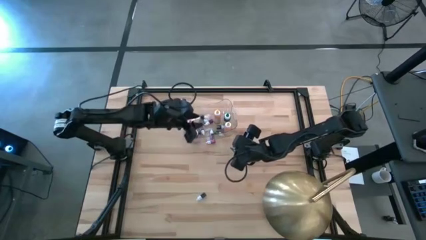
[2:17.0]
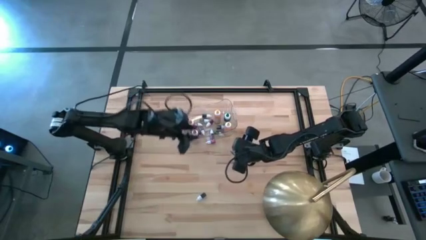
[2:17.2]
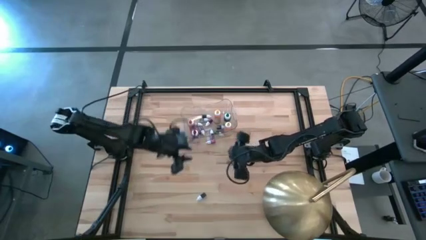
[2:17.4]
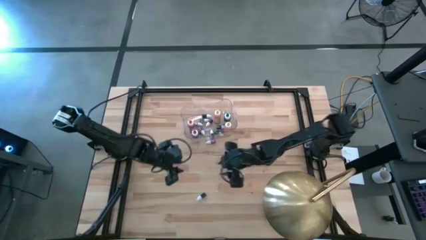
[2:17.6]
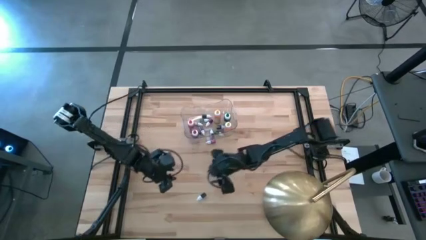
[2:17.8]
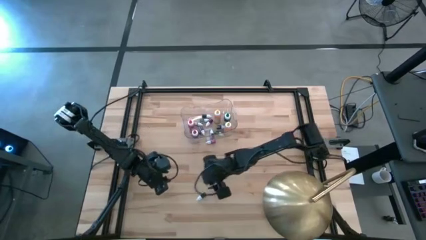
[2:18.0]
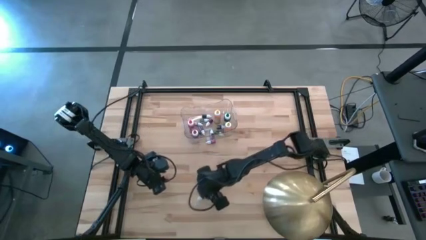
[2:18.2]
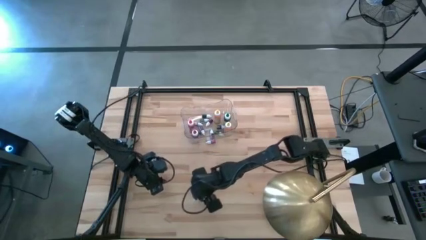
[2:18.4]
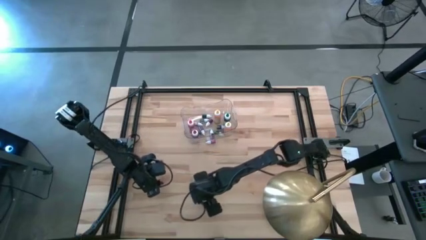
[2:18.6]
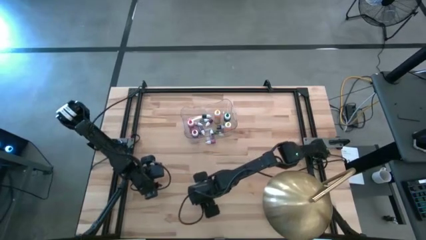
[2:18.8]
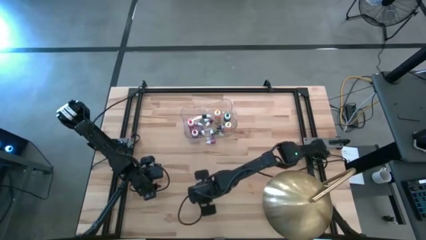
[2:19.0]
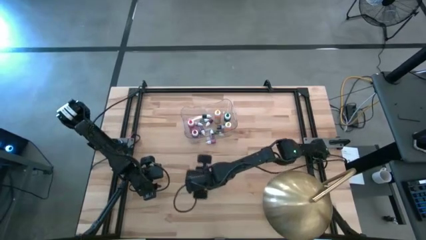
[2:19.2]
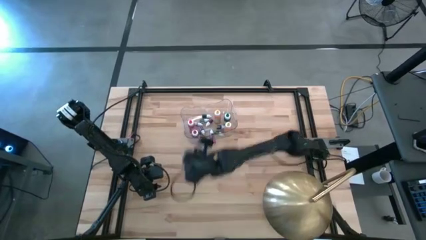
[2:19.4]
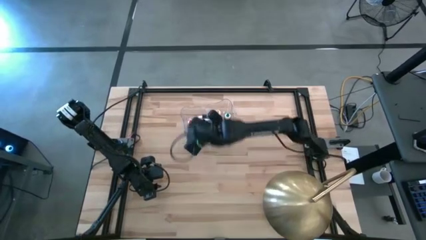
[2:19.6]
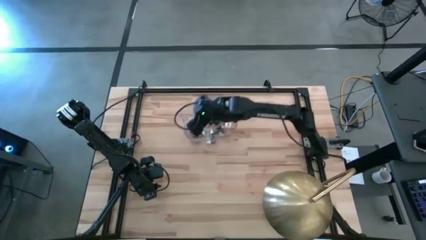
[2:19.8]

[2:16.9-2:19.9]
Task: Pick & Place food coloring
Put the small blue food coloring bottle in the transparent bin

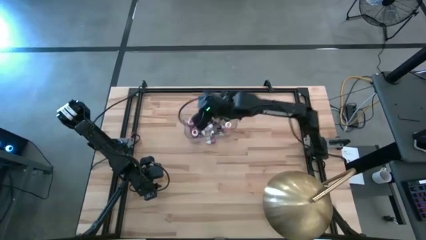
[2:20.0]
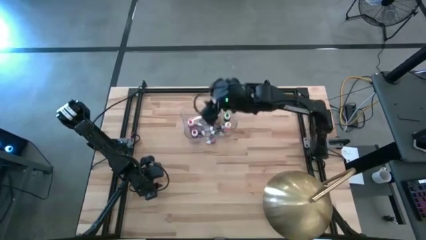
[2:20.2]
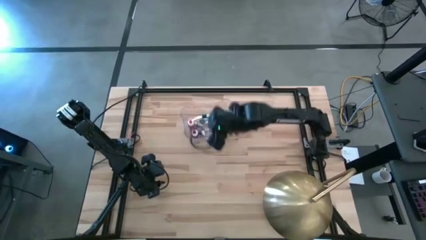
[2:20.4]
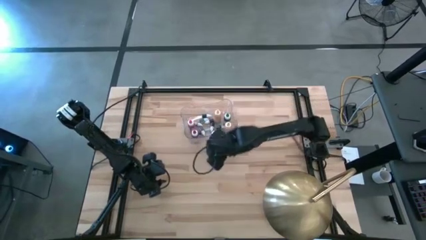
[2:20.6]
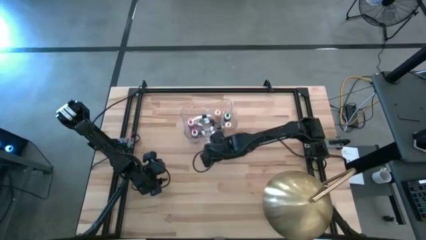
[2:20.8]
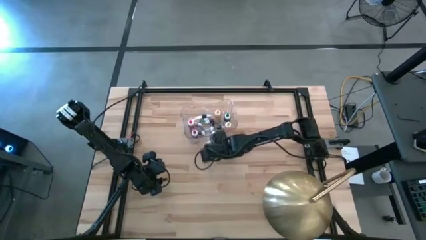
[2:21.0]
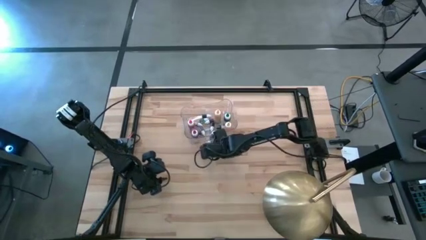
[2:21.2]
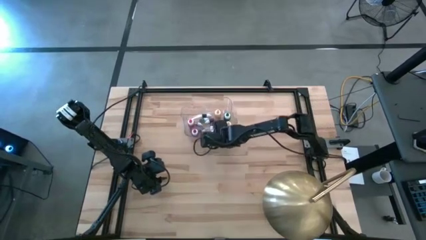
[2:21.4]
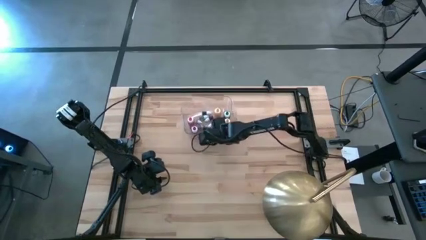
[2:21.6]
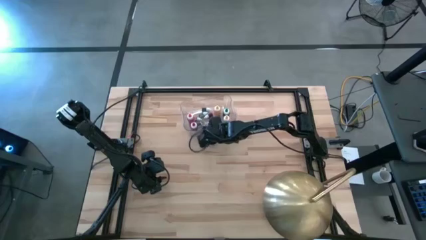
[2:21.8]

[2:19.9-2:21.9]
Adjust the transparent bin

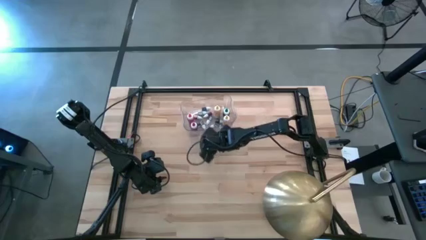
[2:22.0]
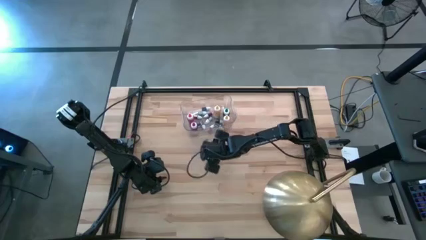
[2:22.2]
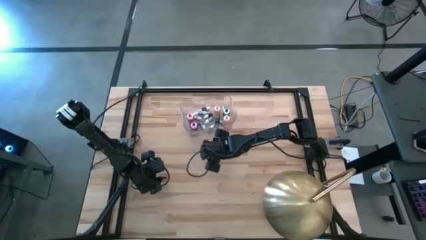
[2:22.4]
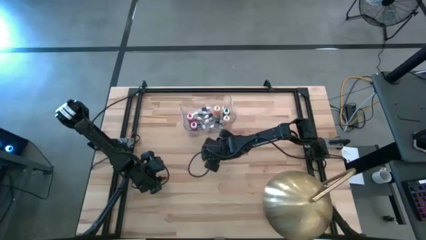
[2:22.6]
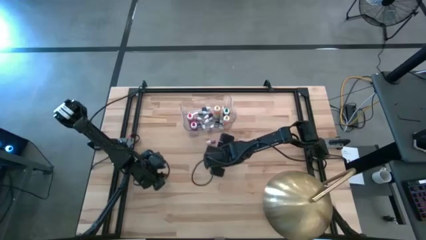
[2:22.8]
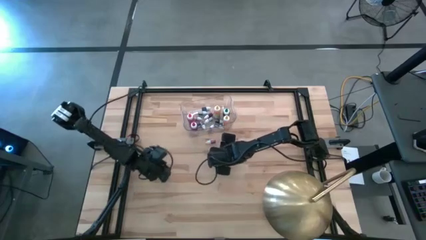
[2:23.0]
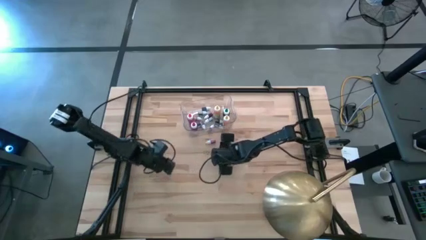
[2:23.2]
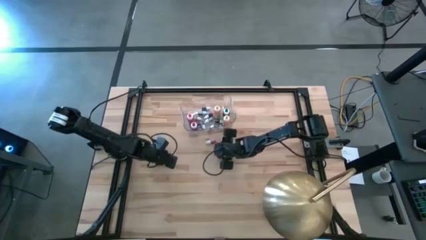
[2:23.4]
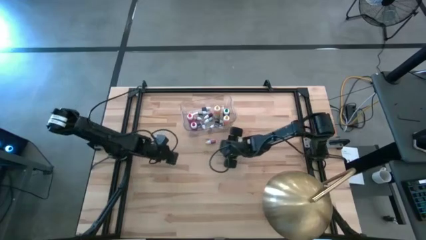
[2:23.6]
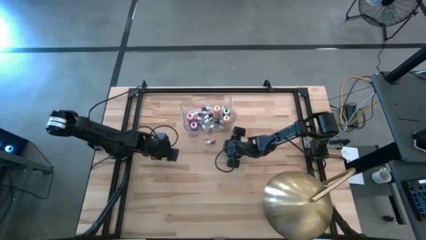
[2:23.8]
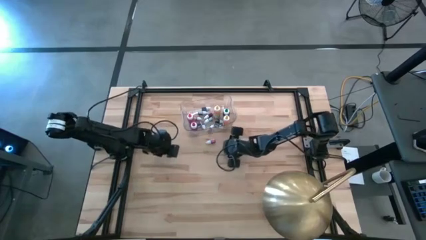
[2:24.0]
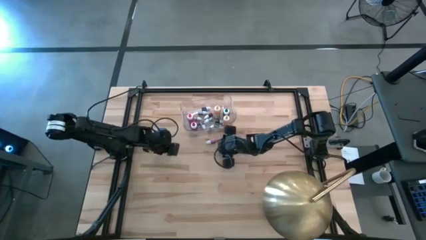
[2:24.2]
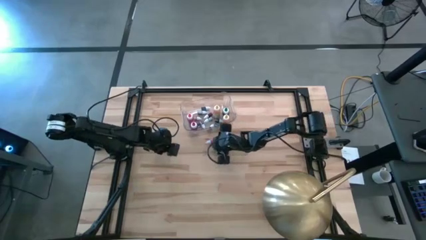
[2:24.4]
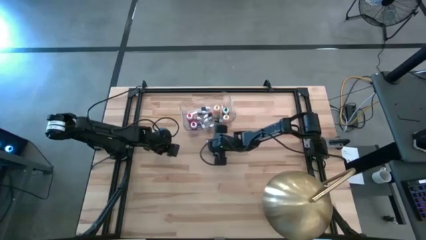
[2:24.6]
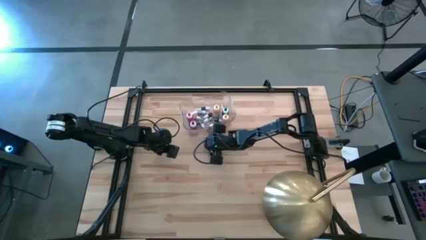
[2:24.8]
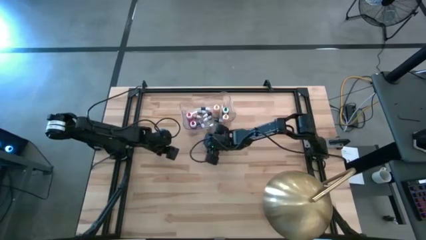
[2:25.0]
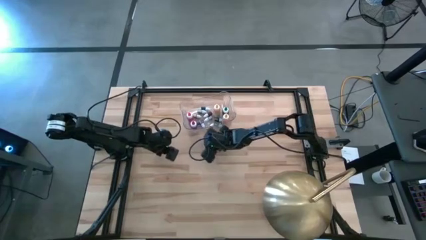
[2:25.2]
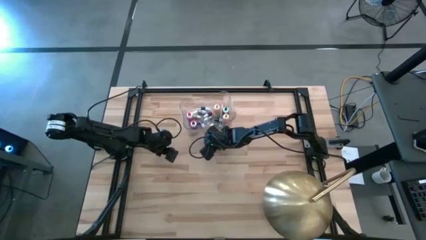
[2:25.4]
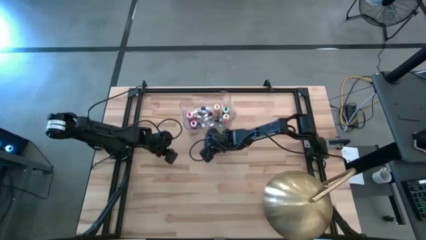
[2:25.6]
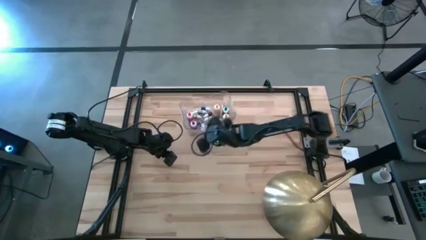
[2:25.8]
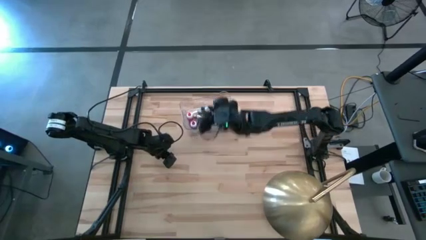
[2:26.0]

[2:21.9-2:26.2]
Put the small pink food coloring bottle in the transparent bin

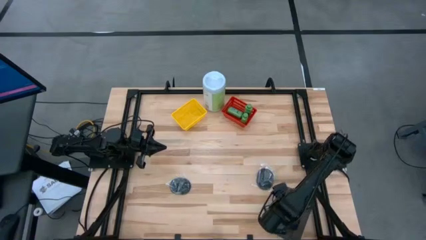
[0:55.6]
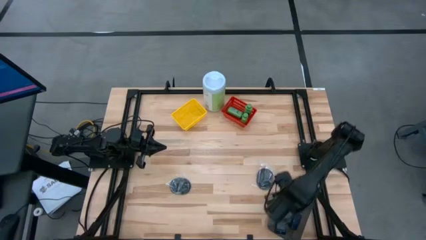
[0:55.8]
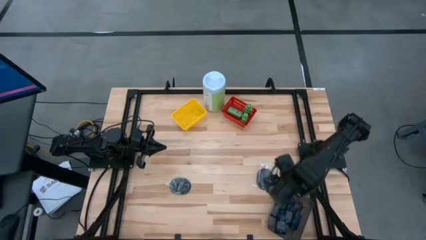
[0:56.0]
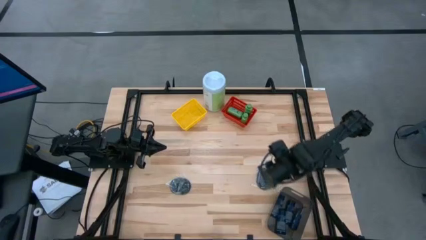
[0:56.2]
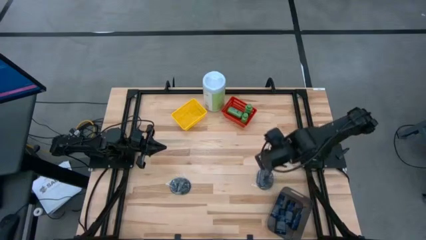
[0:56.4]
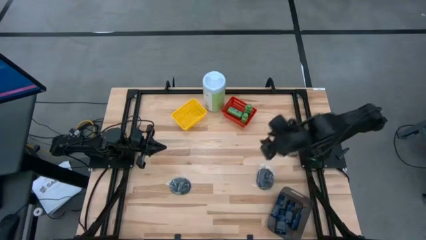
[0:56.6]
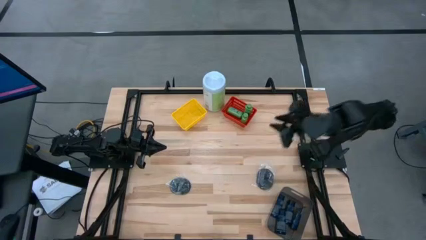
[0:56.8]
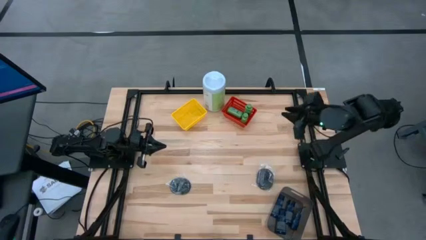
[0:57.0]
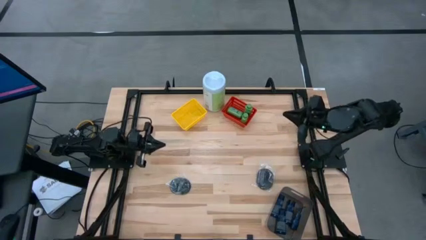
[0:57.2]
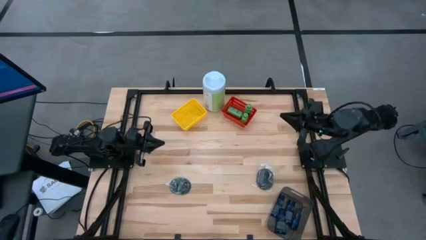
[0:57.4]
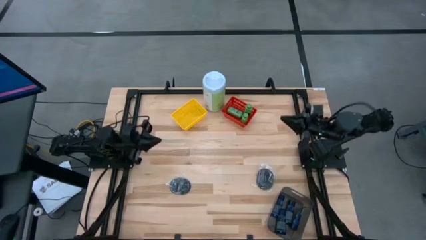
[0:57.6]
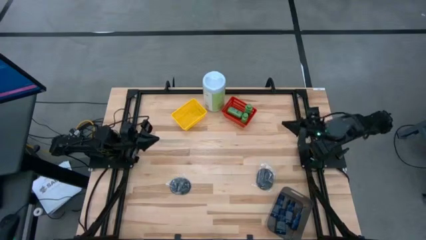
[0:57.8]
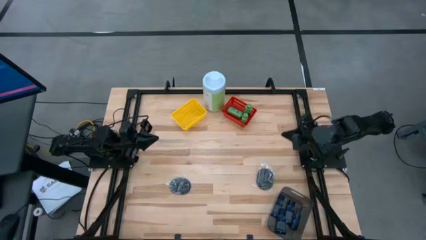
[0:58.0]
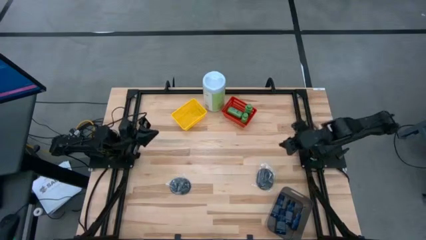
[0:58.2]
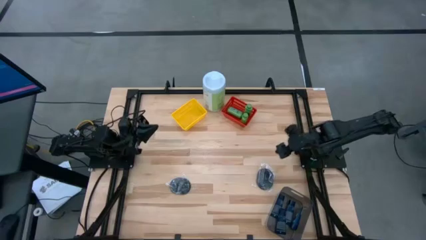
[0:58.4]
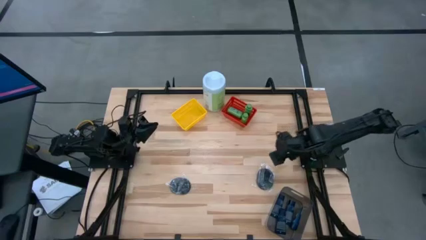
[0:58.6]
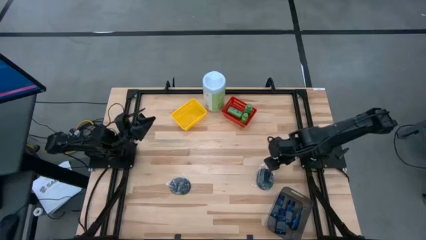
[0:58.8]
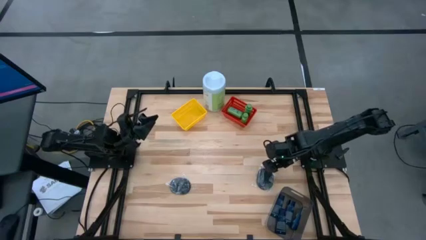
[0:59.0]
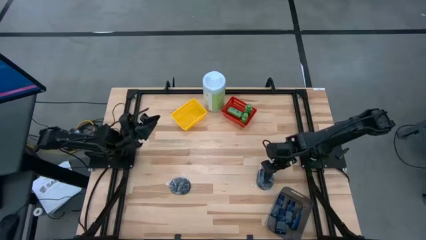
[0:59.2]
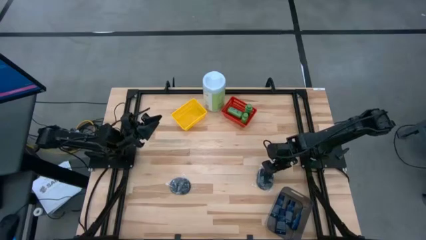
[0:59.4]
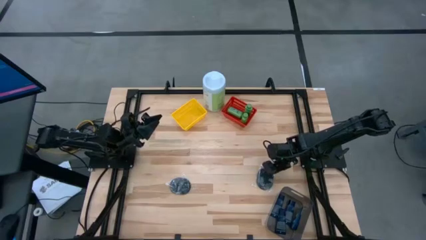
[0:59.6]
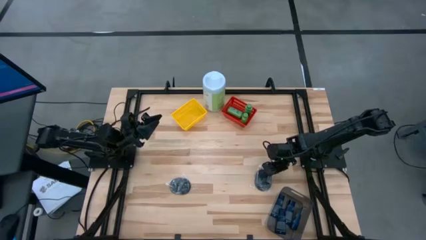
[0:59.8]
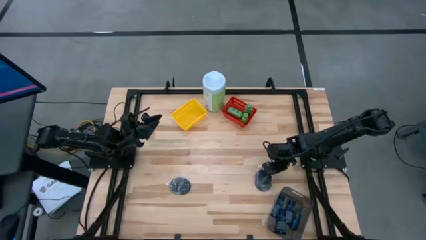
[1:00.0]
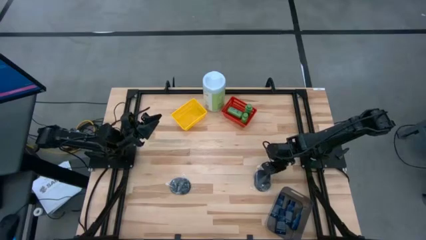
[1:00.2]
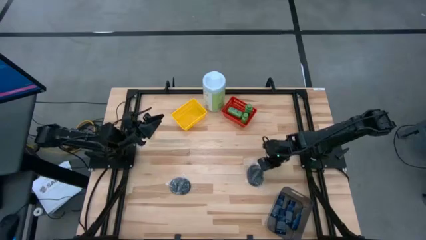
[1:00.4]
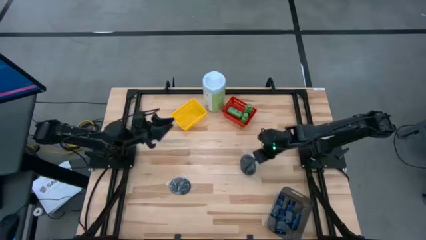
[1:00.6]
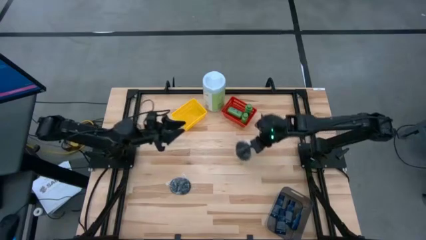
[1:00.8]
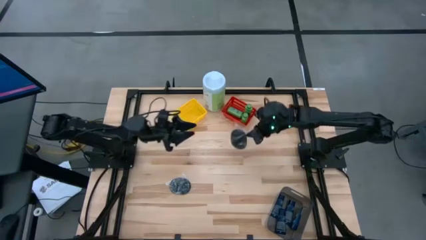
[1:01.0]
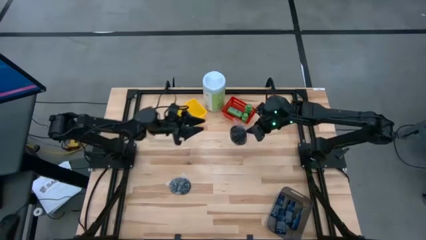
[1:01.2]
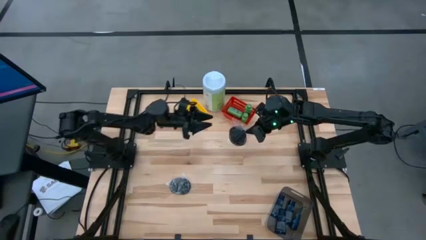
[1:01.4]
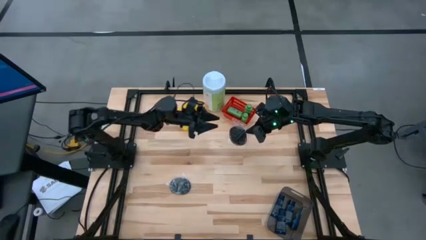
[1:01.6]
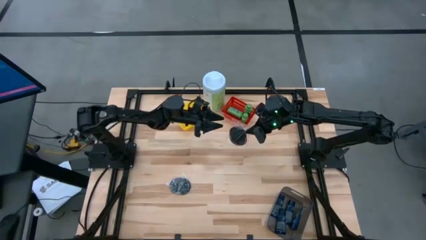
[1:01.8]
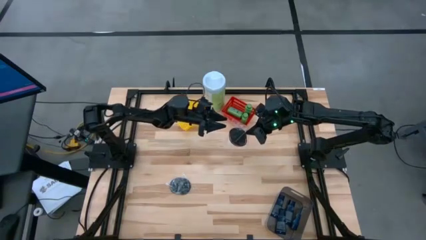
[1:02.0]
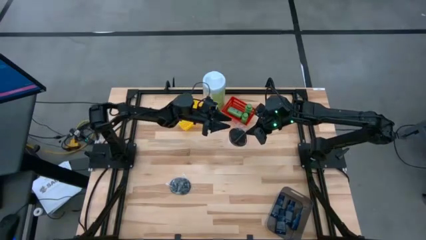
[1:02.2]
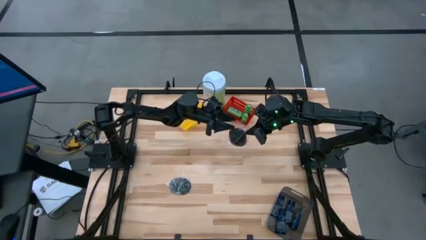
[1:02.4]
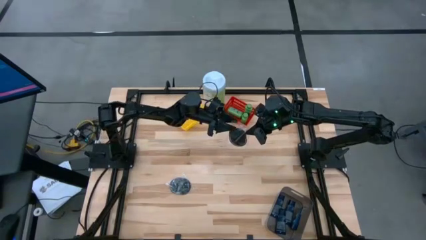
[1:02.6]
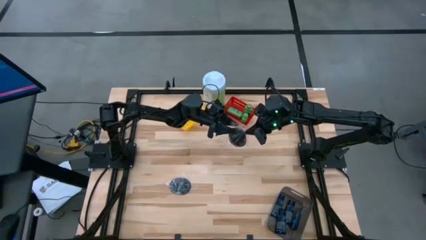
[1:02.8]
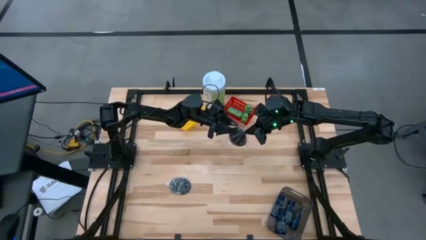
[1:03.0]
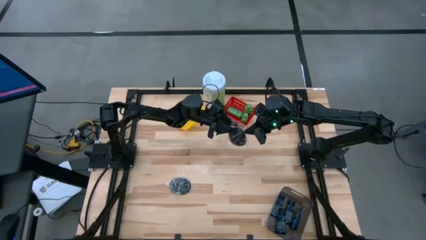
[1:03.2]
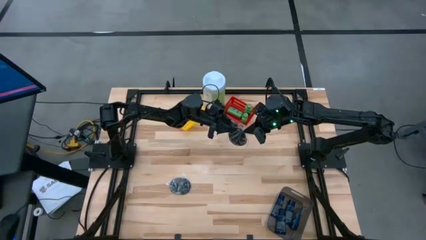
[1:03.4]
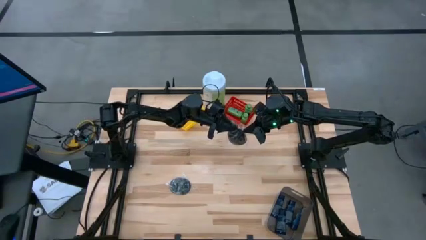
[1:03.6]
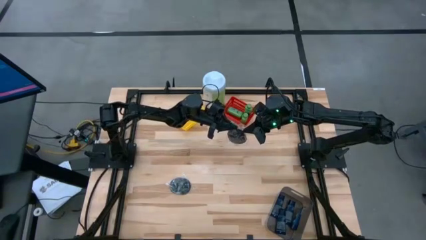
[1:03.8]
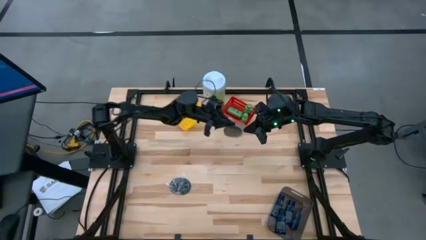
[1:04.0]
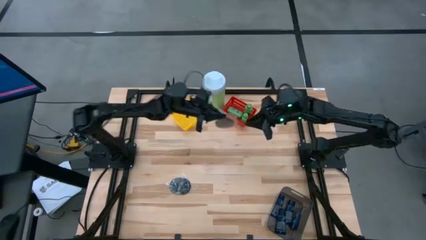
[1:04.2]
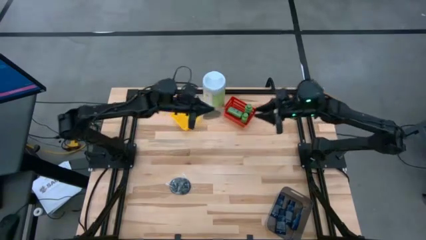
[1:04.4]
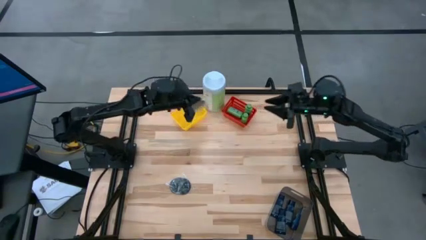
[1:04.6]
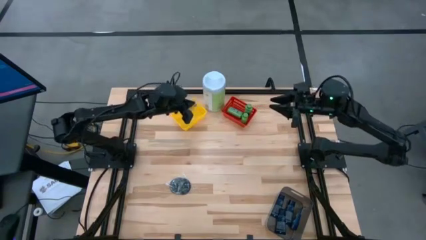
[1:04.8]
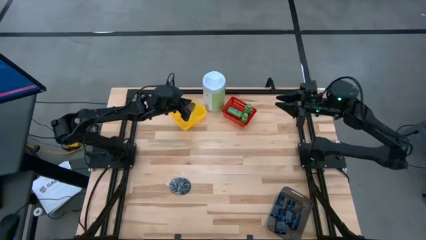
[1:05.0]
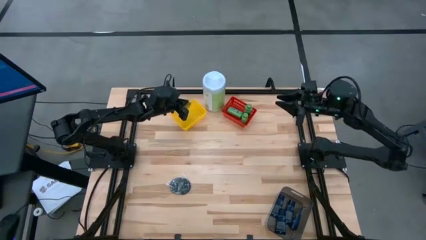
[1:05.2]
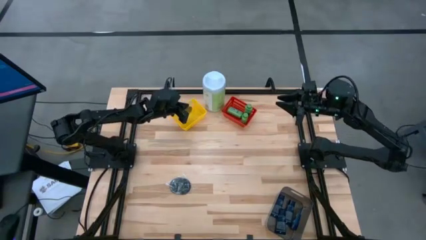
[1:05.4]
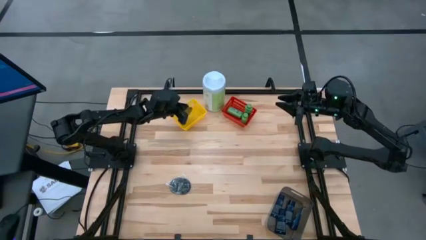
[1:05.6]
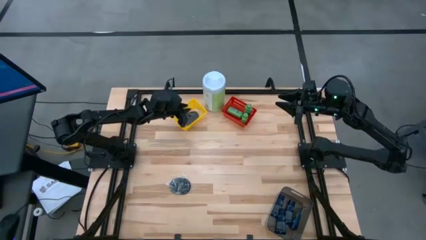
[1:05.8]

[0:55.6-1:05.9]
Task: Pick & Place Travel size toiletries
Put the black hairbrush in the yellow bin
